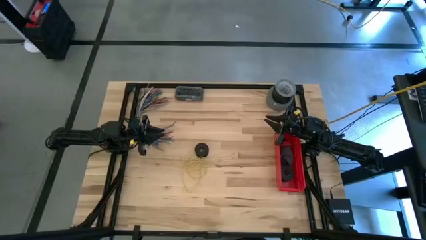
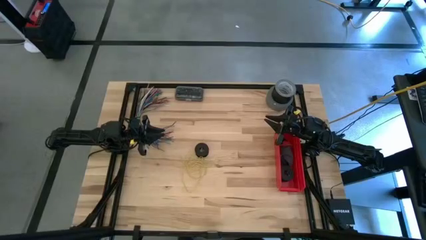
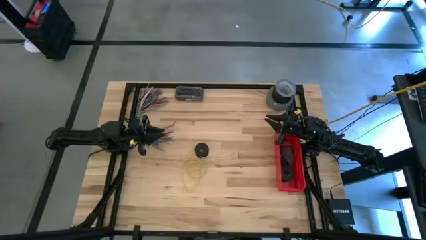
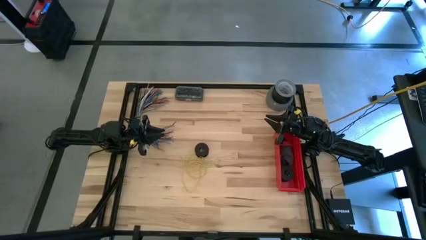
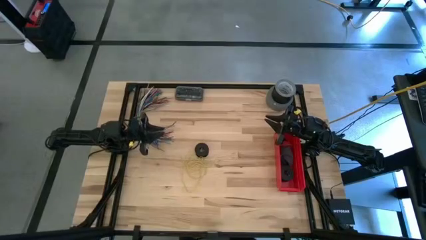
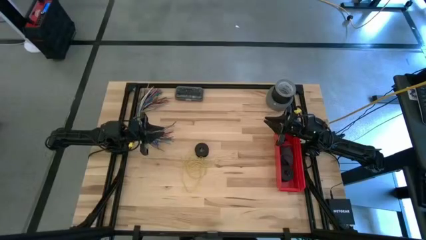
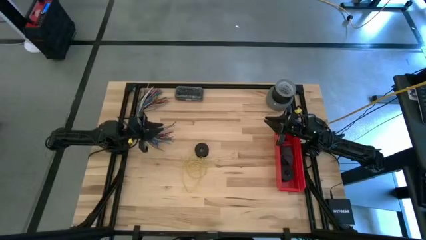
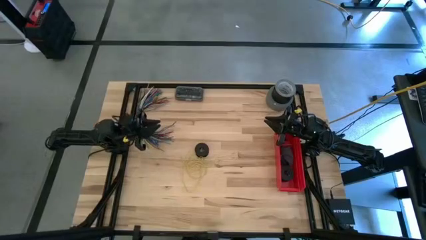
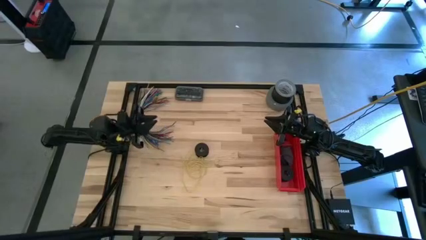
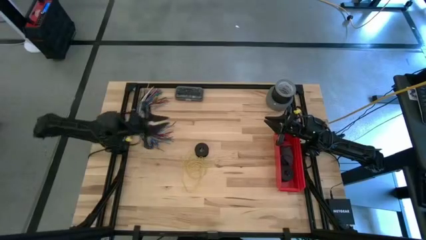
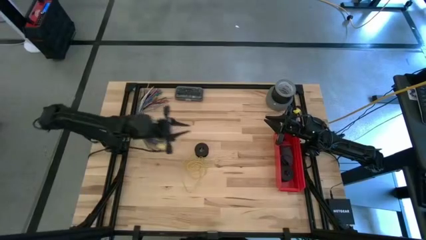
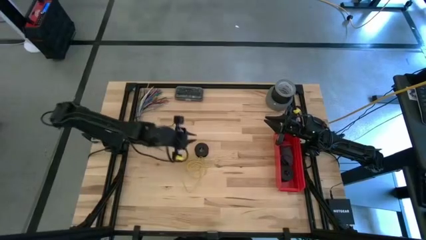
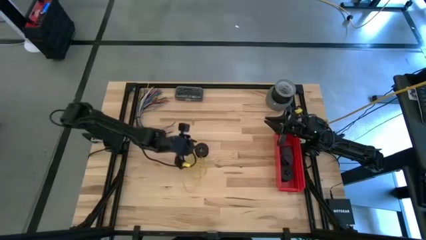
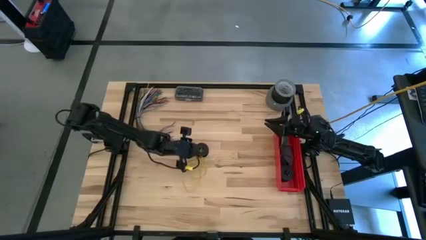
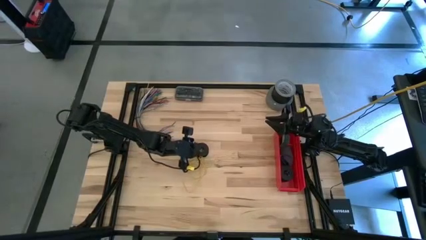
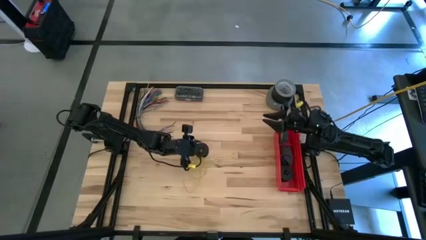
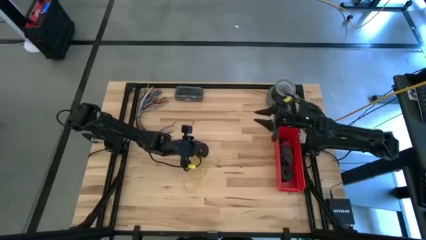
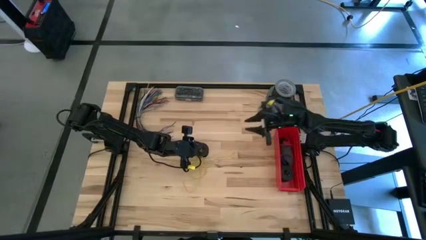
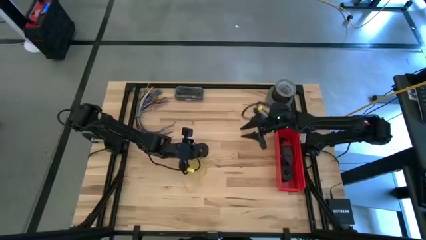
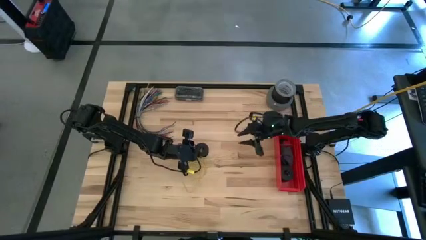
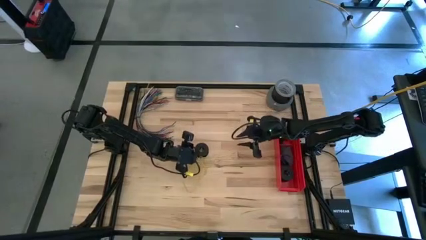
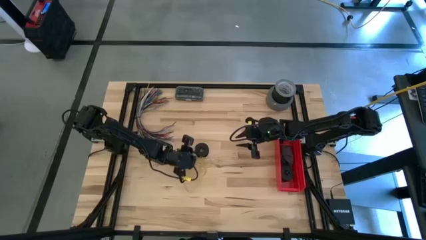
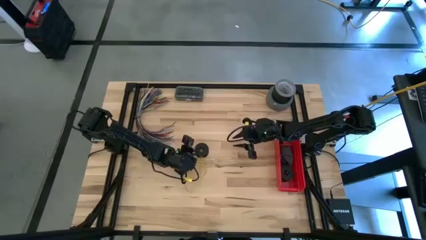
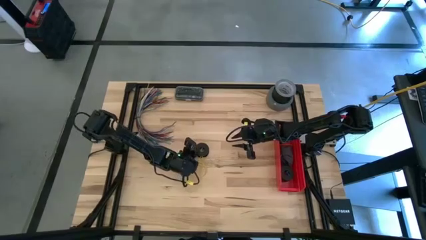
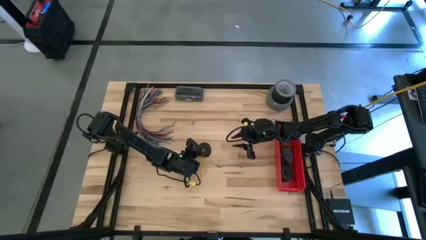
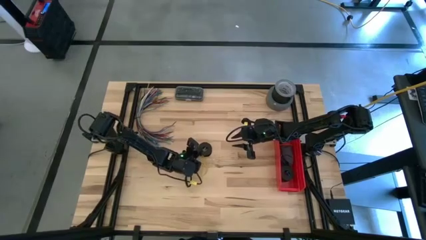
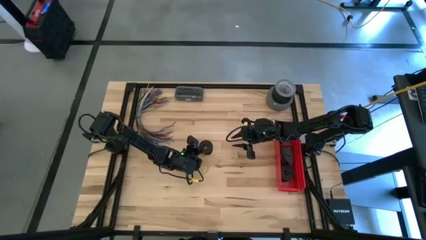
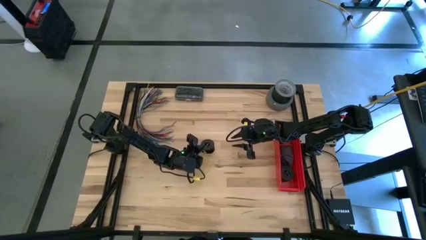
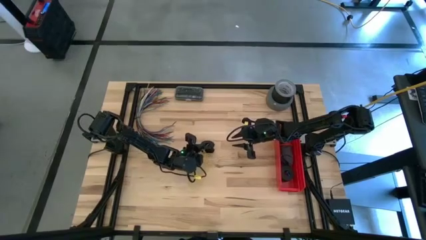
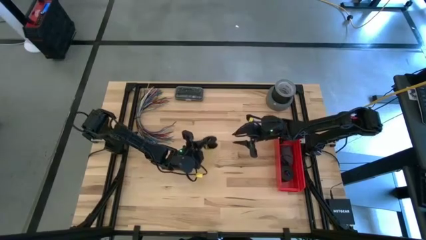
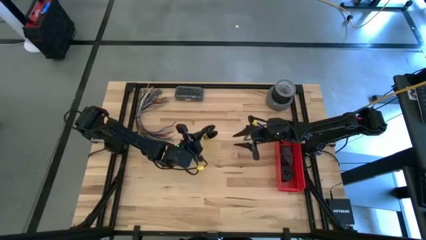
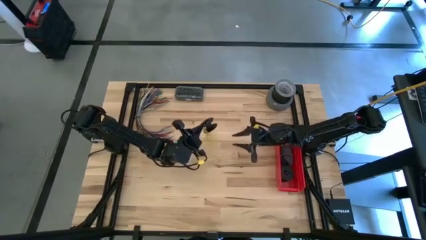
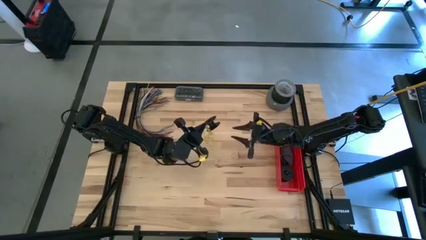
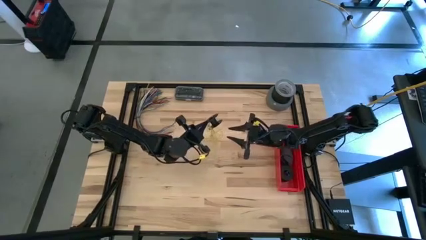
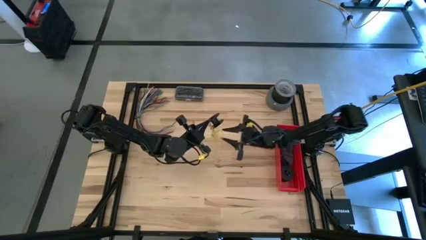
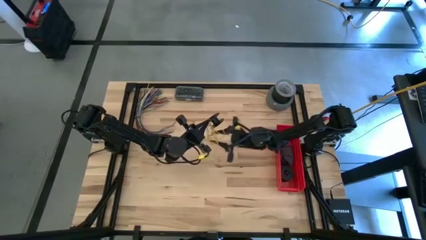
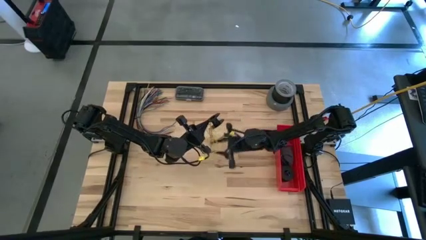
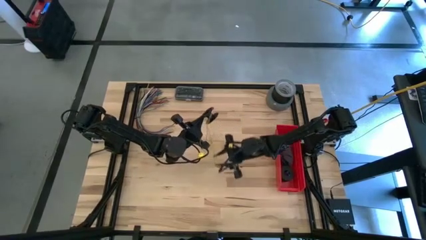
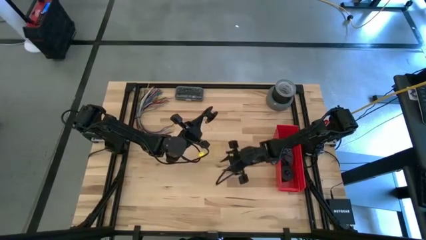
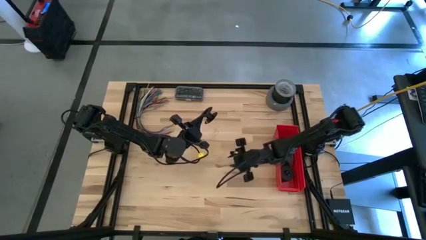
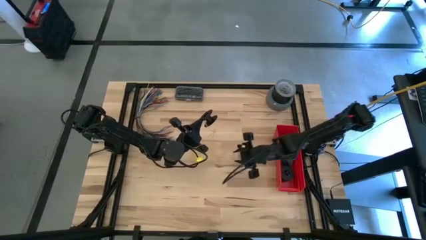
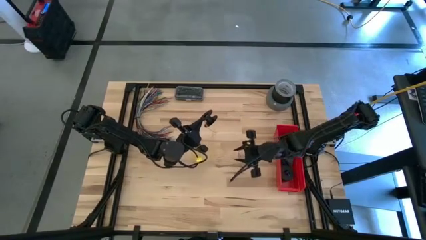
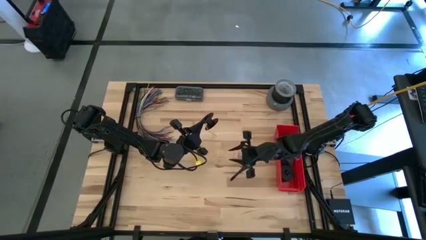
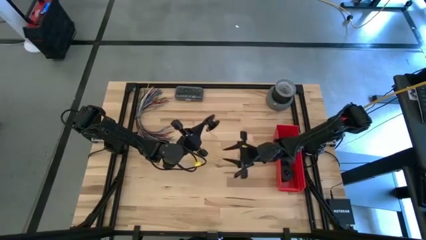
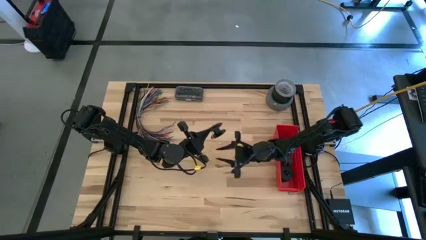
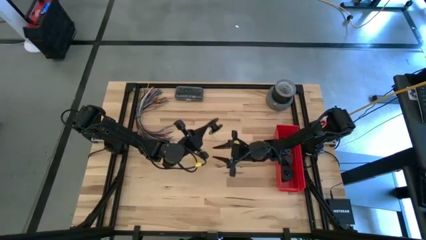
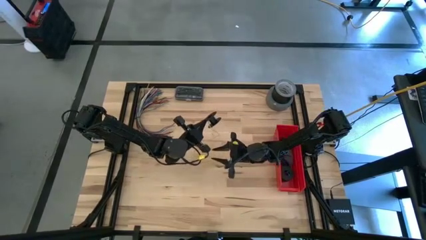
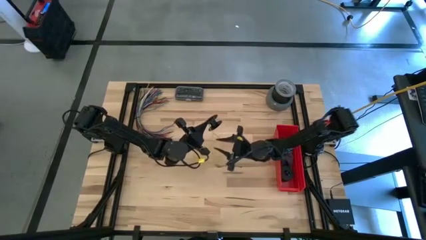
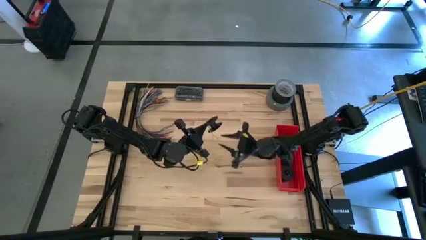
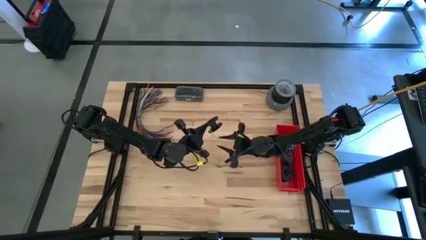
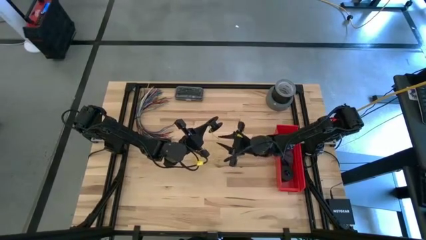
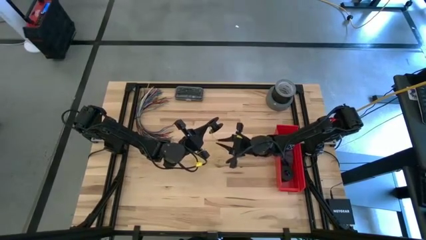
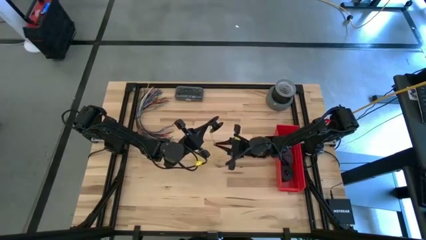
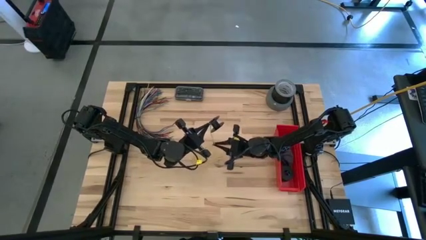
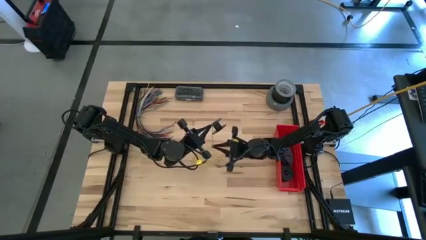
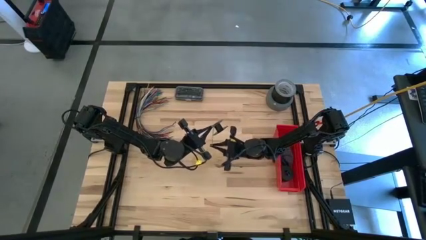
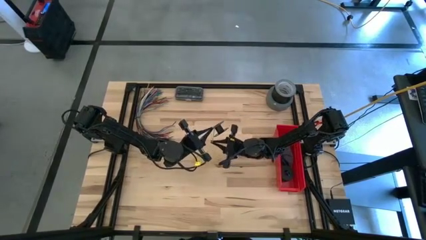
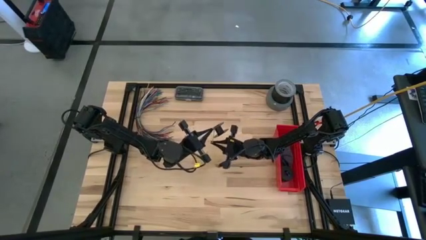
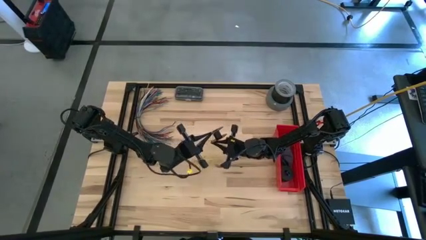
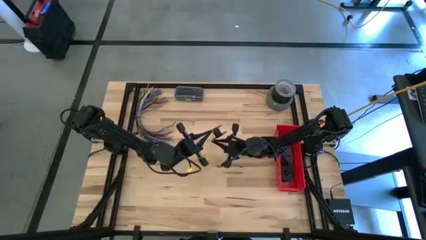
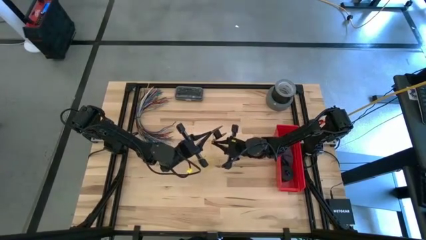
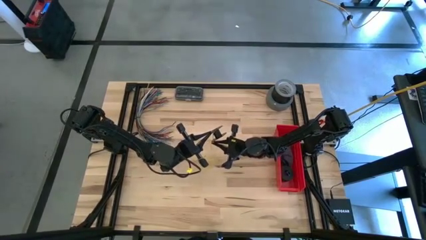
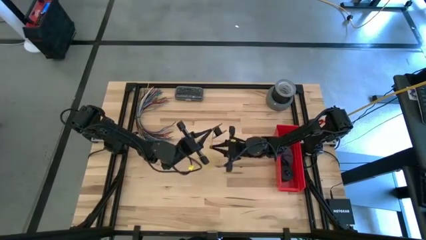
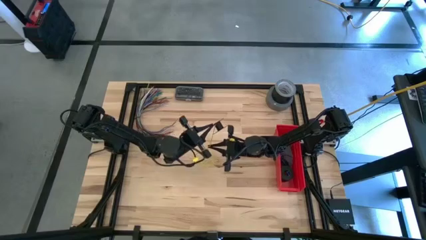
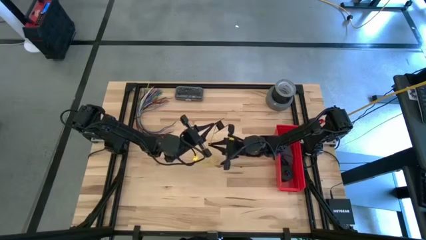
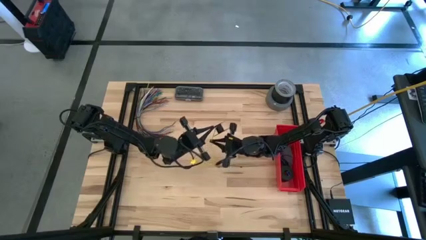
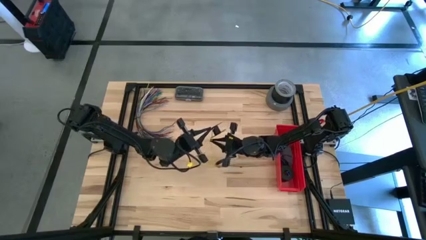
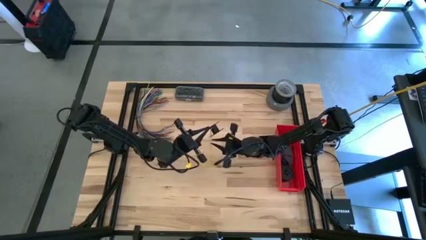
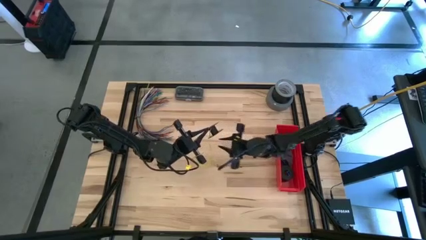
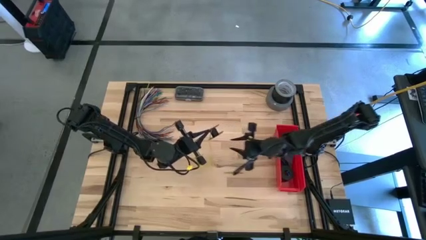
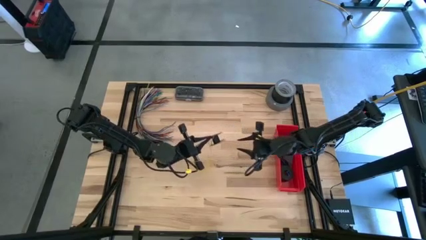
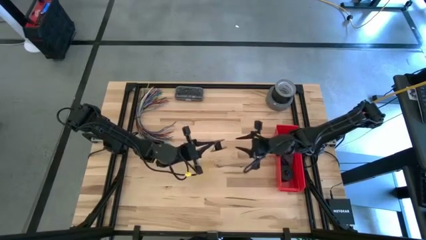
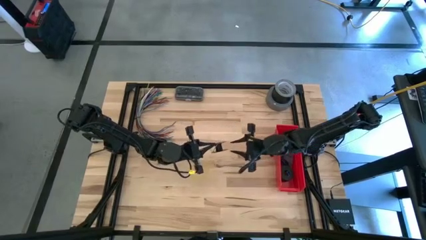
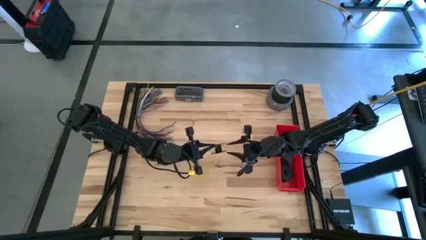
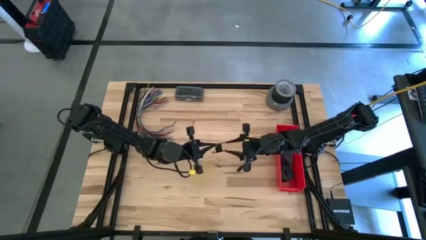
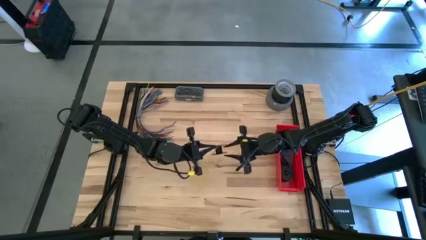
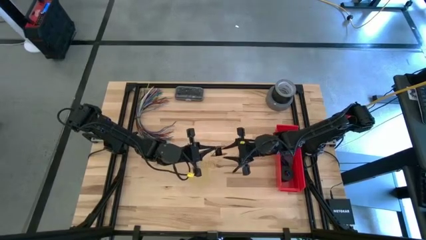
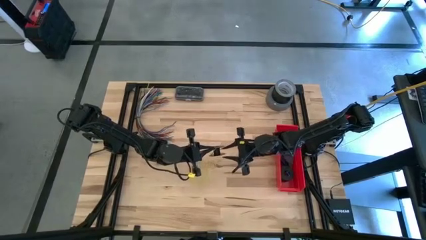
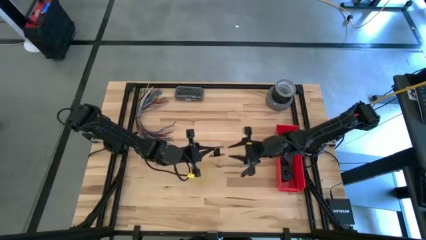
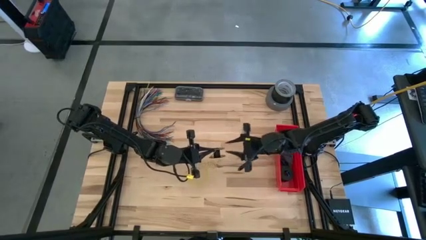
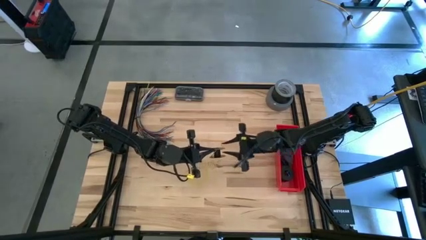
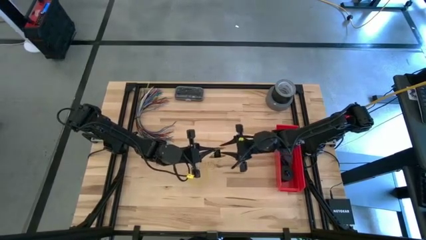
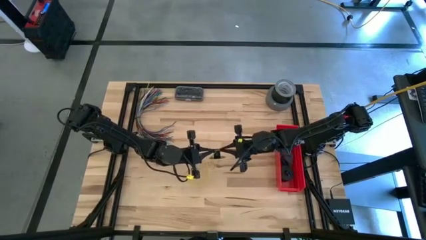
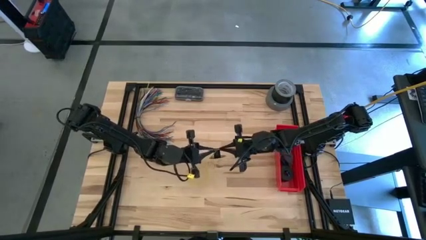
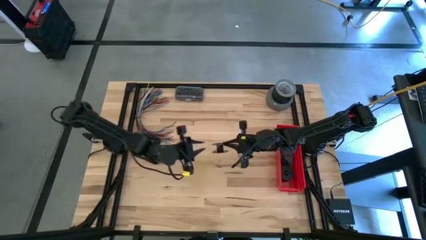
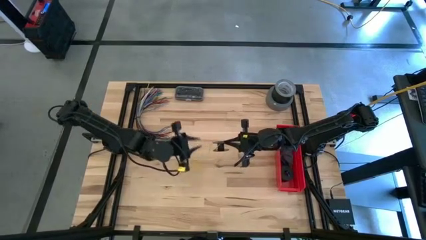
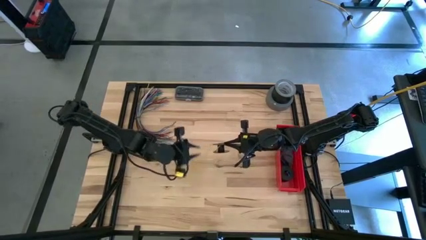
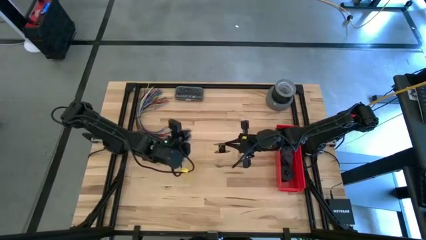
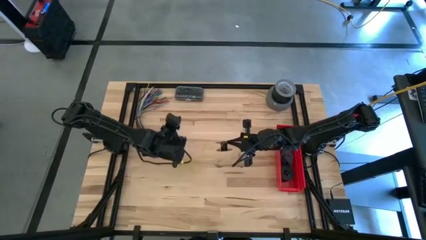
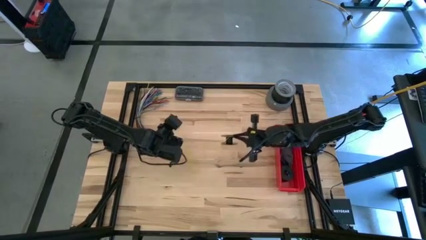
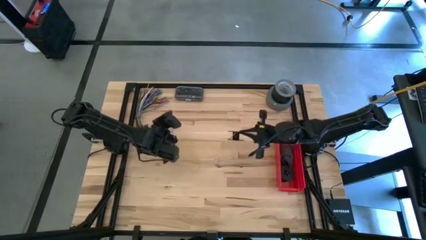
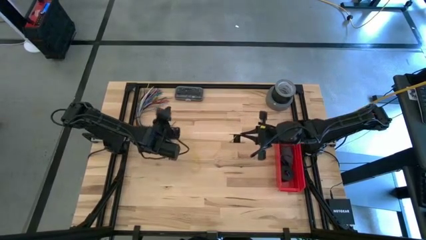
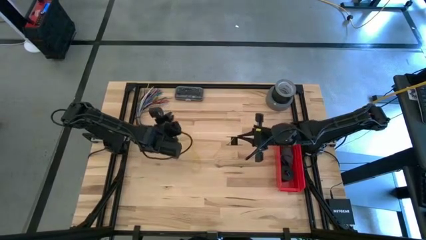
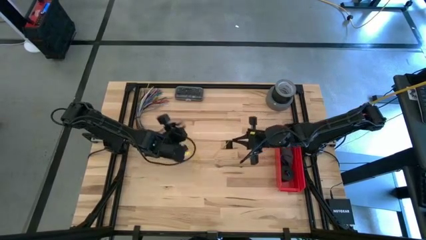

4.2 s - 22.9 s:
Task: Coil cords
Coil the yellow wire onto the black spool
